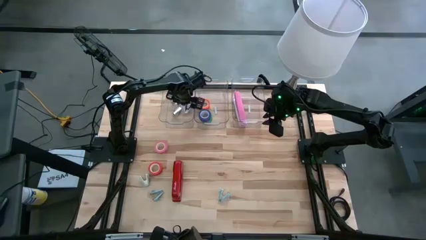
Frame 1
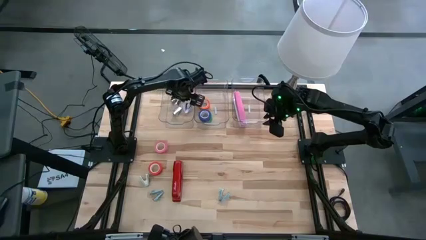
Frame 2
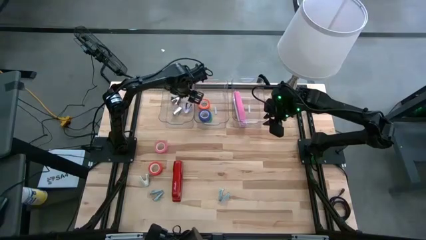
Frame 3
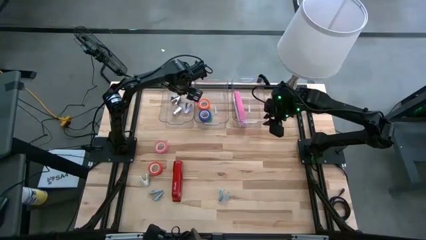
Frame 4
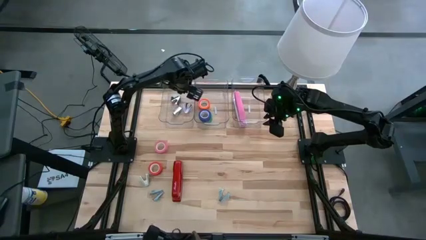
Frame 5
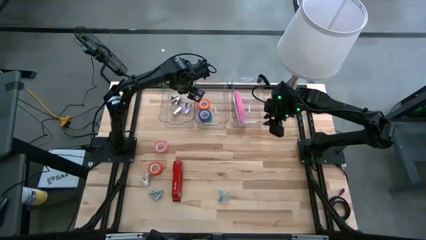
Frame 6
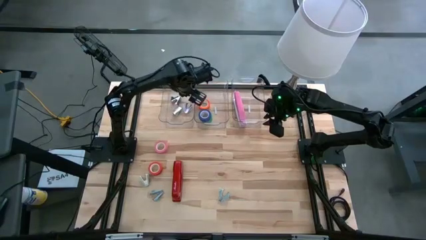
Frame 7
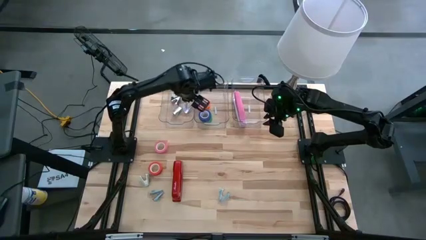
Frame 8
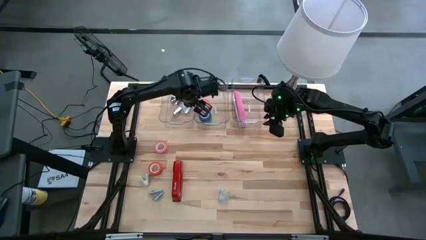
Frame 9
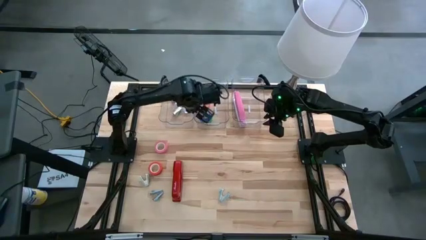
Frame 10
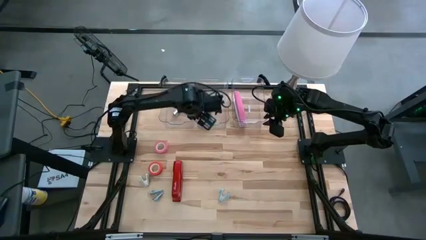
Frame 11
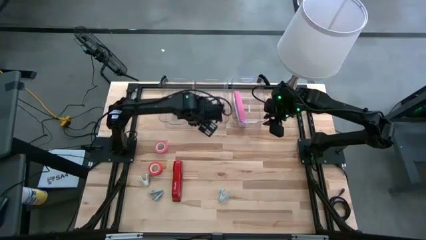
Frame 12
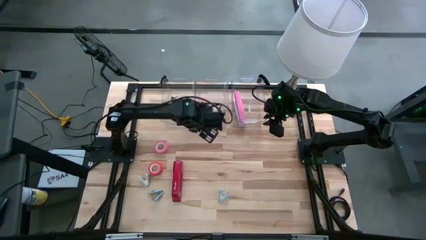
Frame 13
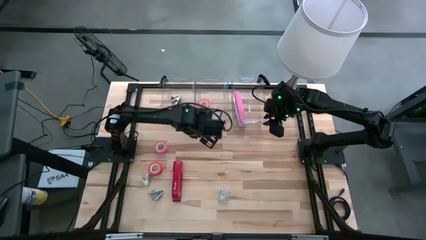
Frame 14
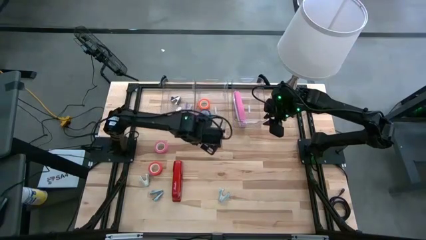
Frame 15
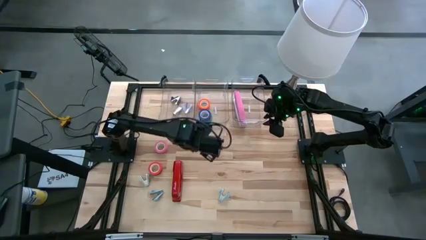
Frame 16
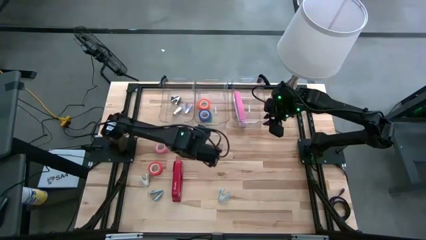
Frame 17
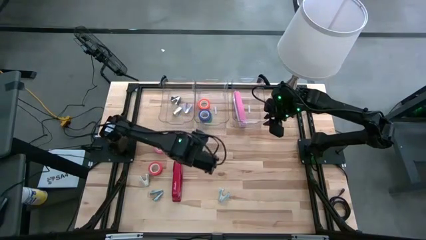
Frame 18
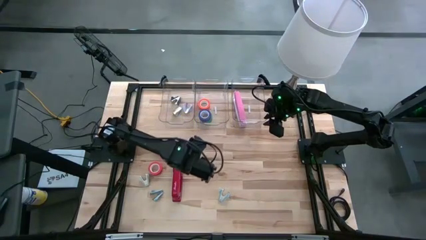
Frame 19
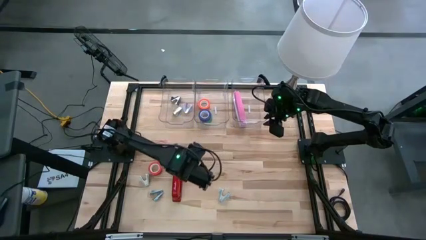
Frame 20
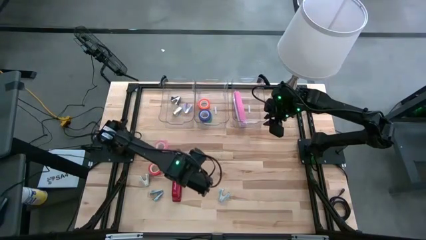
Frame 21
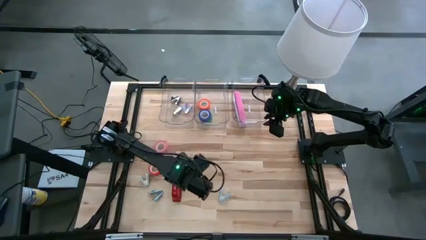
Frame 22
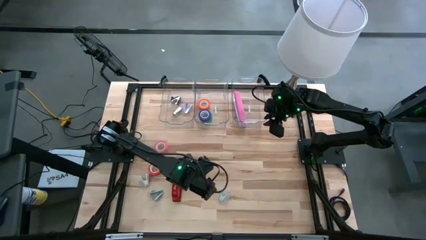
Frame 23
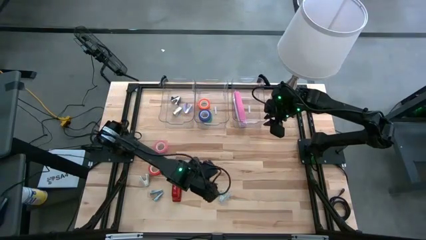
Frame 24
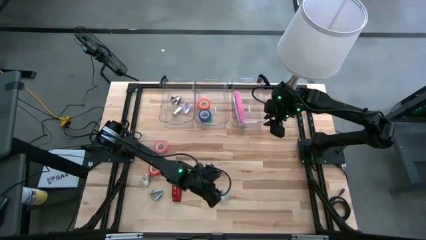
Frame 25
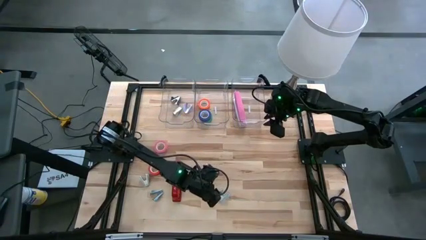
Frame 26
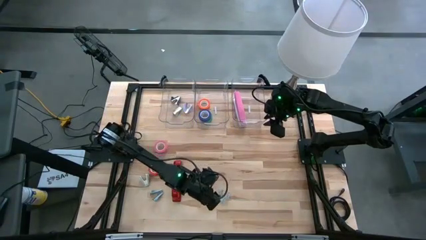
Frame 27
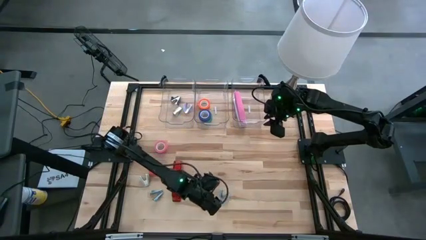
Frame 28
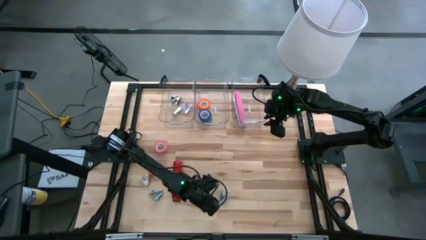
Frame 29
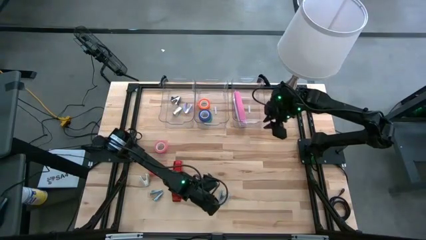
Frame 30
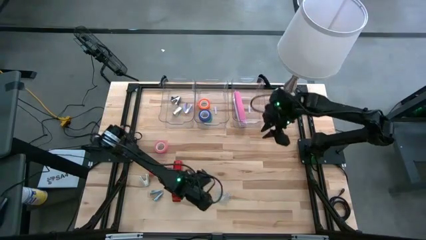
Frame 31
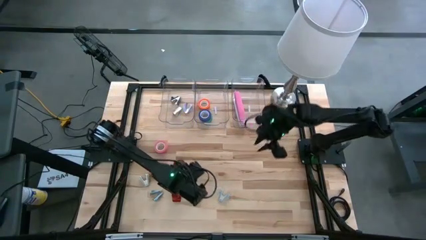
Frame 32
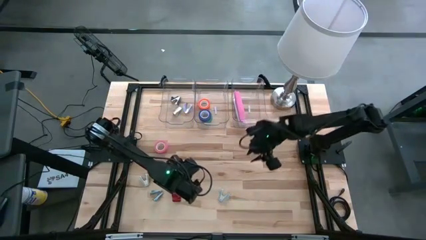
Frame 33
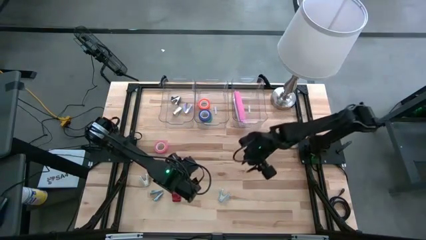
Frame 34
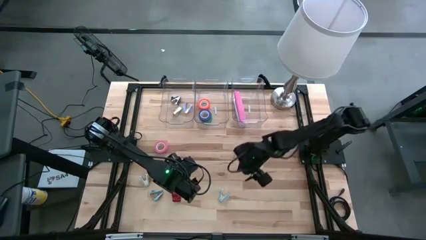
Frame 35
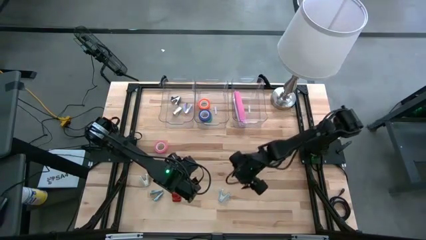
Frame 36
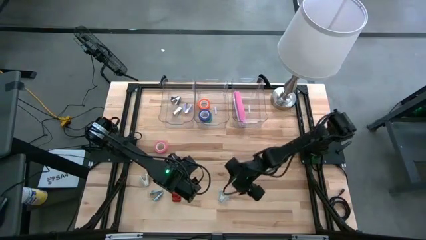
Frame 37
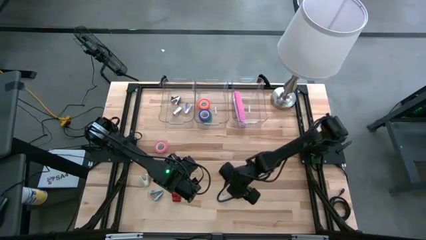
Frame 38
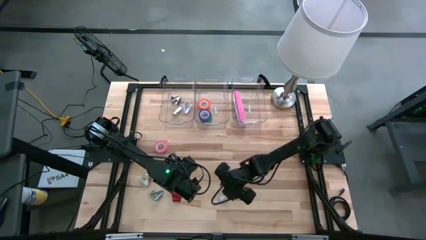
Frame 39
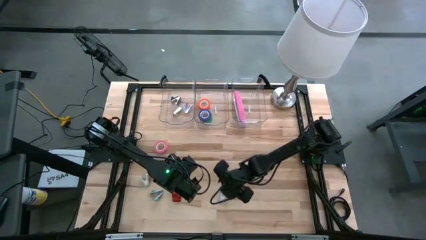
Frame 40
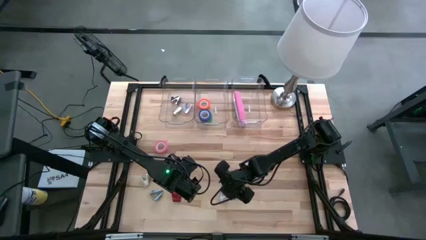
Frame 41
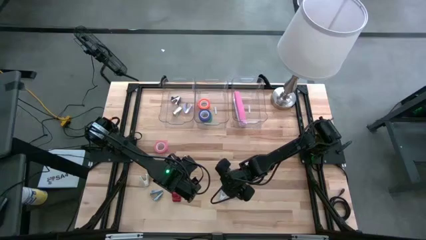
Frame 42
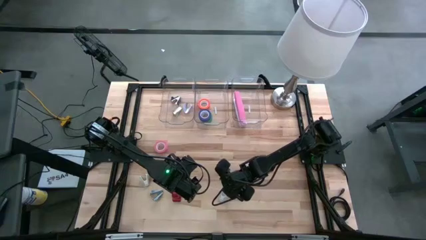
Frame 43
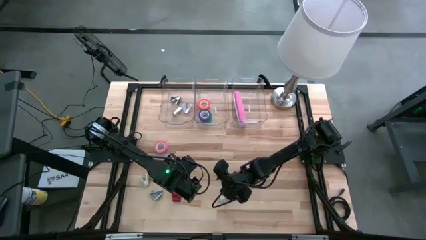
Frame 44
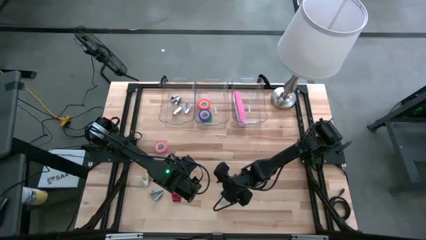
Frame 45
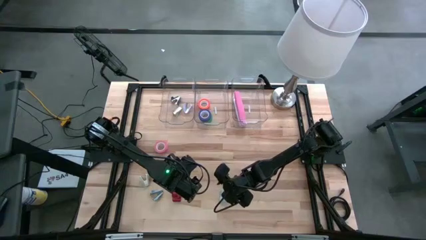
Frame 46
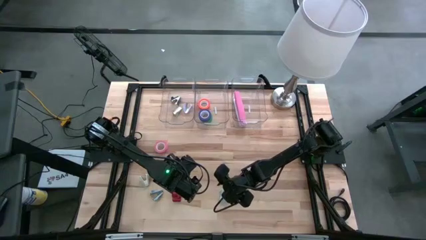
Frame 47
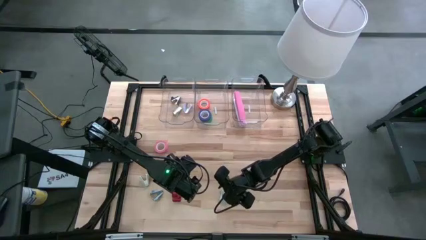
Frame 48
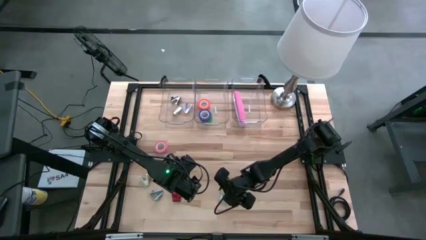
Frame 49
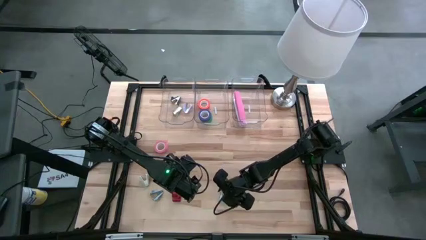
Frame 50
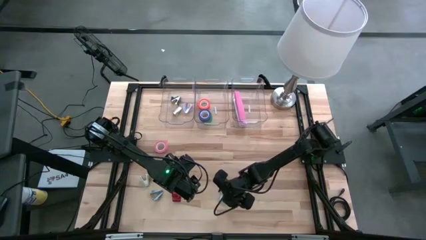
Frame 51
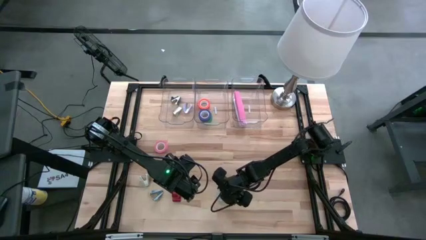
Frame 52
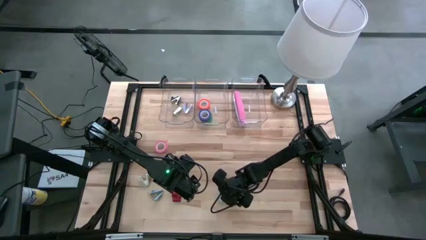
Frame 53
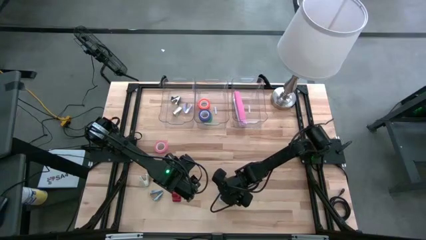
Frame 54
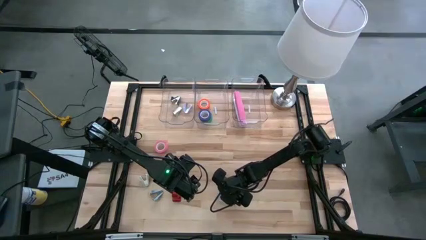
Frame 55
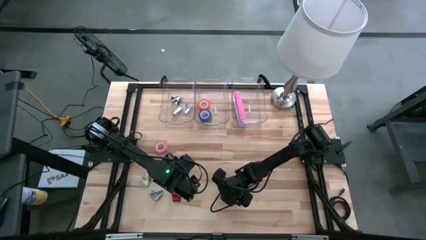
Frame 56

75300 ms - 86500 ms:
Task: Pick and place Stapler, Stapler remover, tape
Put the right blue staple remover into the left transparent bin
